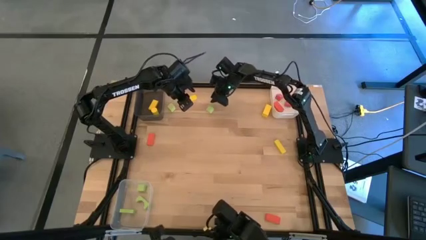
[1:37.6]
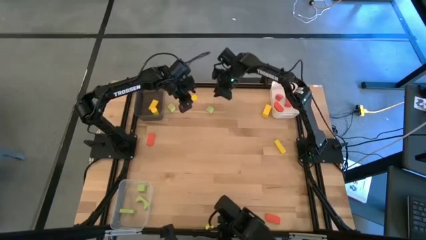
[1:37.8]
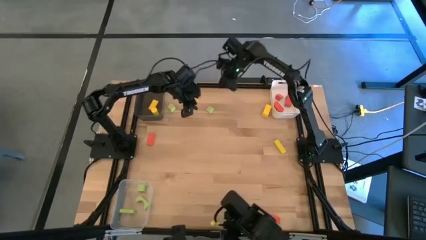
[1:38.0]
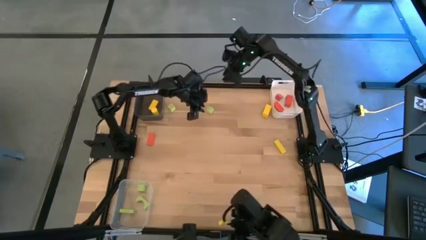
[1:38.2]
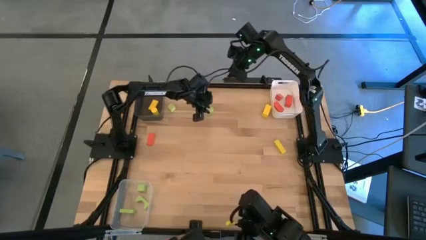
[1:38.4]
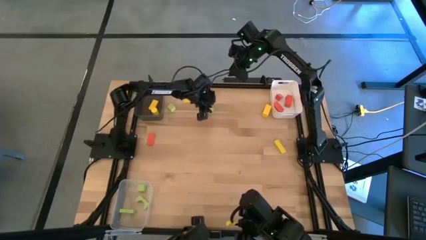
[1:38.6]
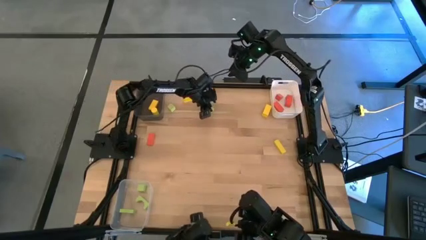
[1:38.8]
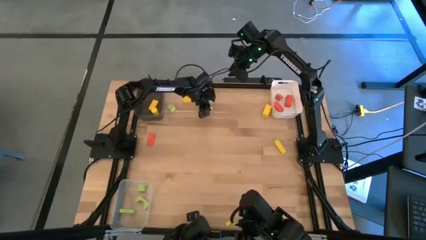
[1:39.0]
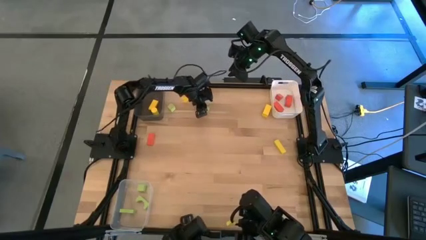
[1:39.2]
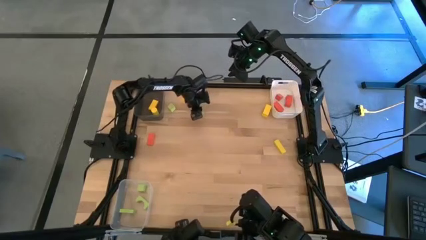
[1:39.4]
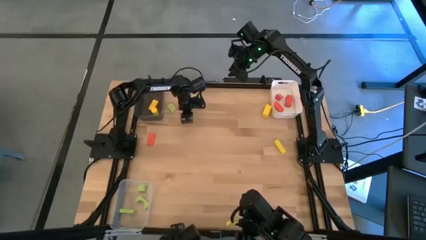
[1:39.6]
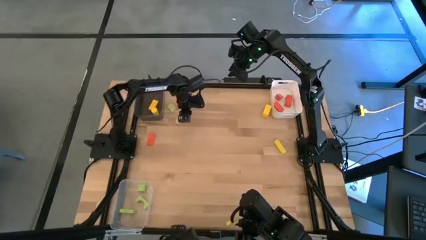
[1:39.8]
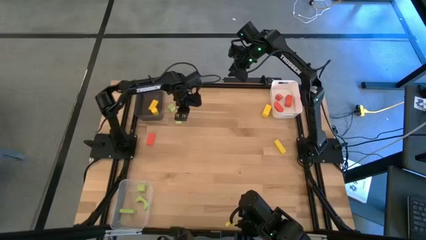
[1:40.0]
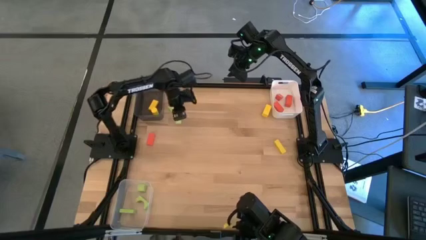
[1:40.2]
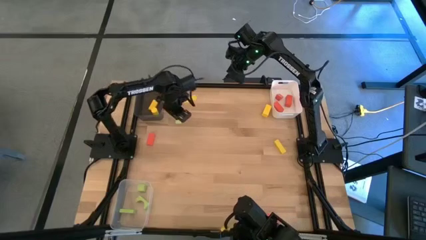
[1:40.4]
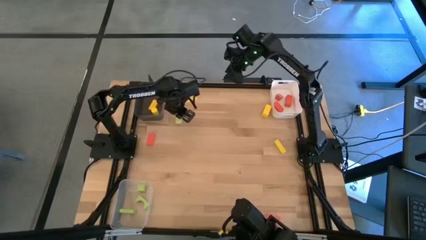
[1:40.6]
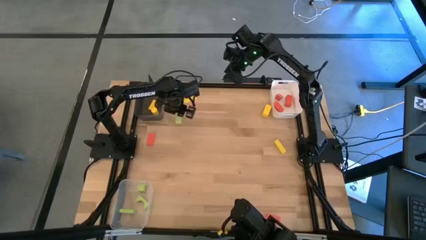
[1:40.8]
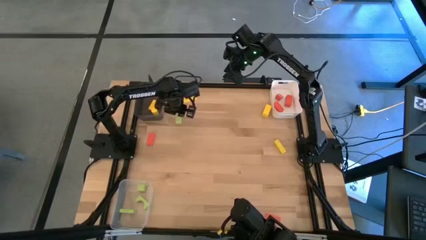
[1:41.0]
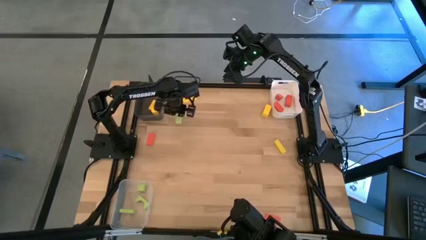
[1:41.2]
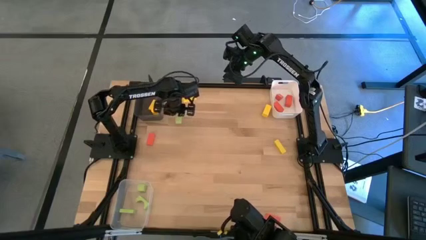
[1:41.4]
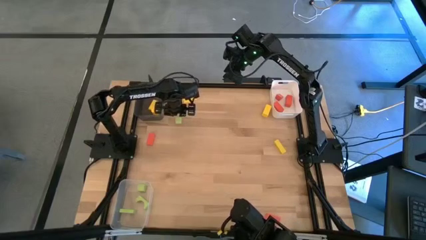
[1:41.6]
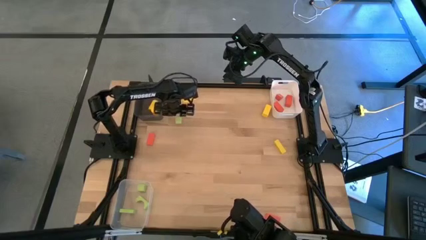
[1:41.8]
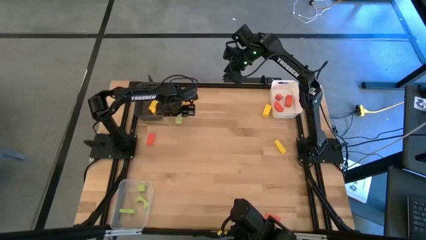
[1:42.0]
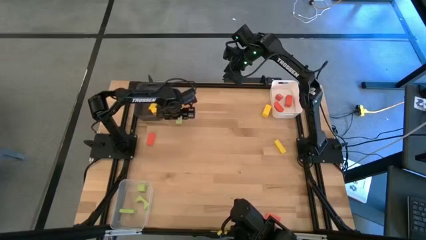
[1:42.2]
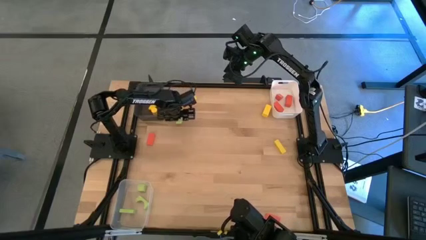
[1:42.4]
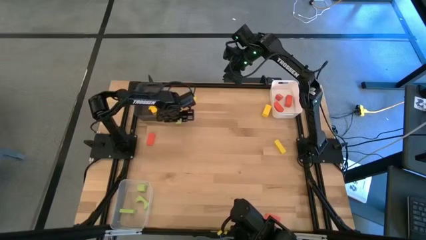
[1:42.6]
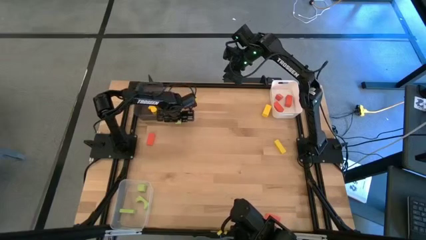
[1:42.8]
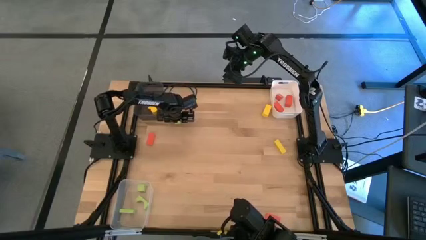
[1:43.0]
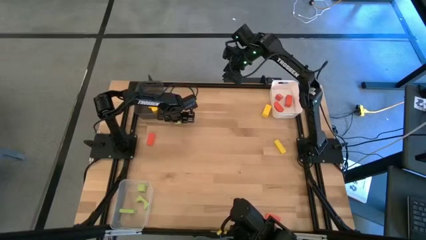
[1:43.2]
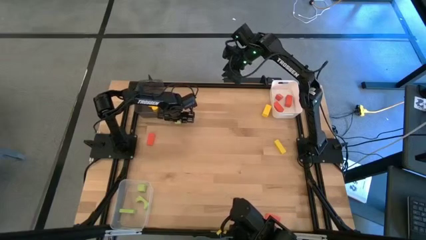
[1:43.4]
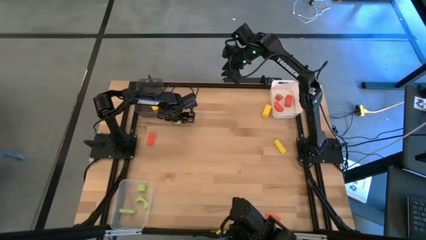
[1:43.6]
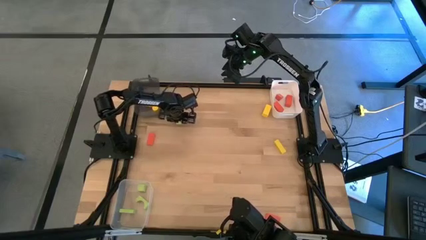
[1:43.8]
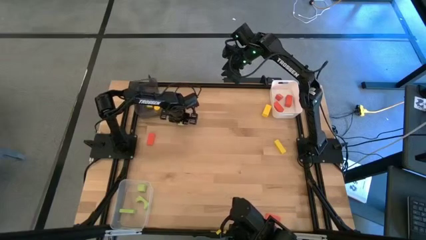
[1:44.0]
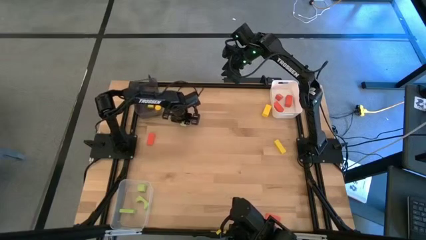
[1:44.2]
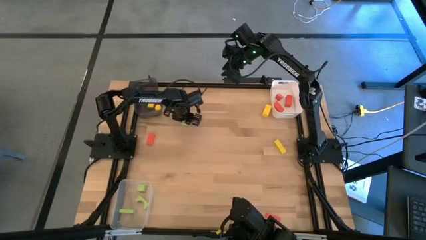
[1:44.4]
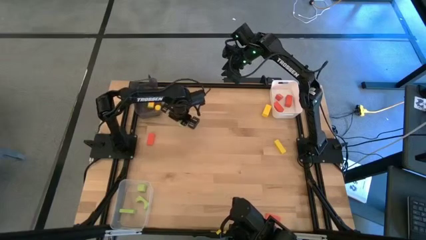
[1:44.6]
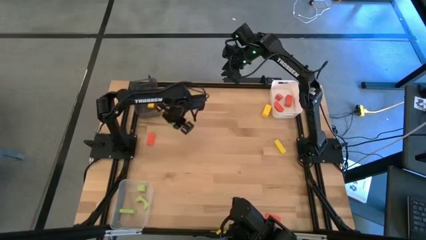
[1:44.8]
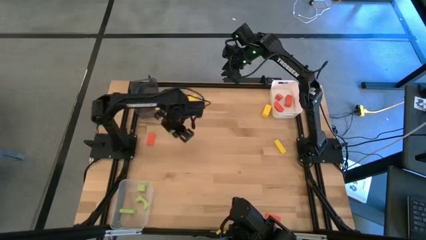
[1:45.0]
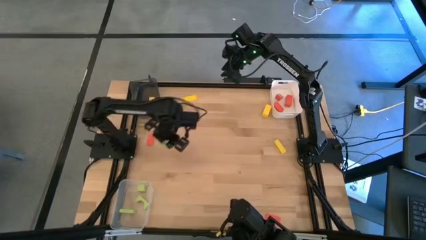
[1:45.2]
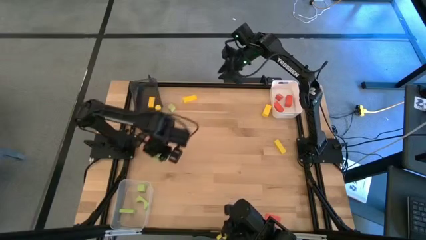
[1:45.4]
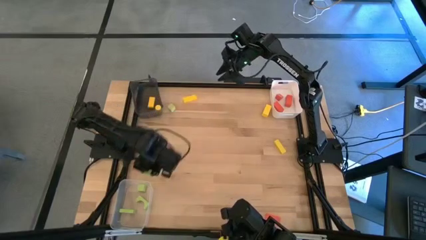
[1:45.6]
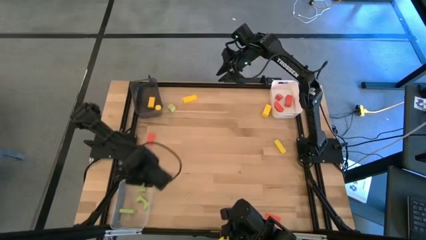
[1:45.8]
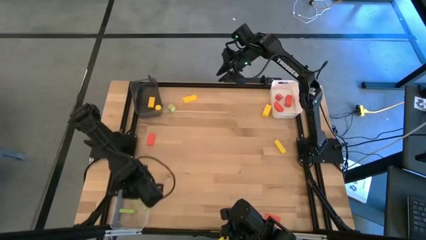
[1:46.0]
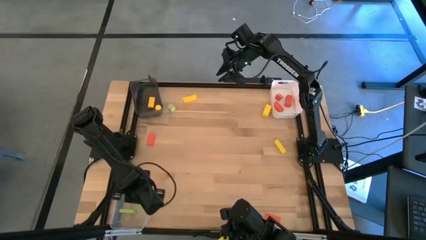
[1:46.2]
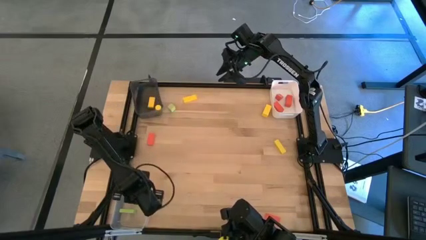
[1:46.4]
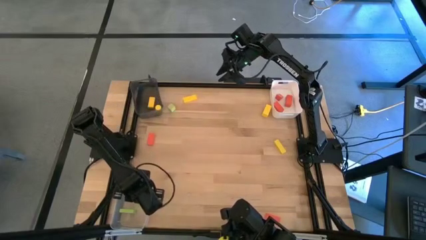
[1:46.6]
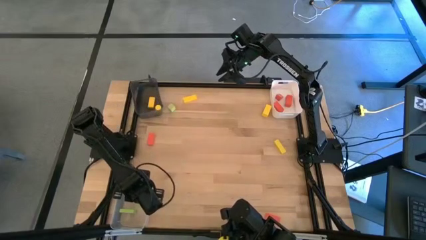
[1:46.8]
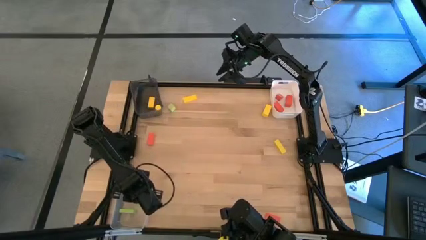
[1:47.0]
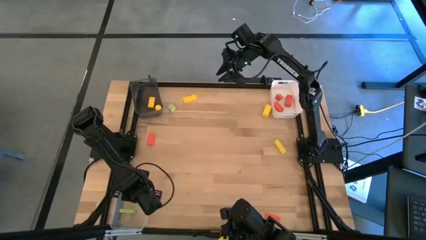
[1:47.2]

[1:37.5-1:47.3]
Task: Sort & place blocks by color
Put the green block into the transparent bin

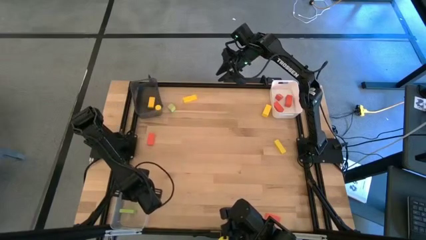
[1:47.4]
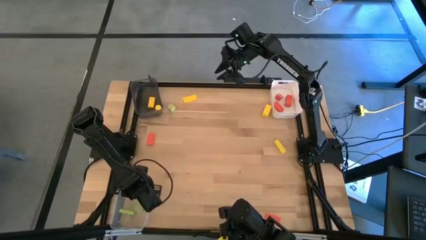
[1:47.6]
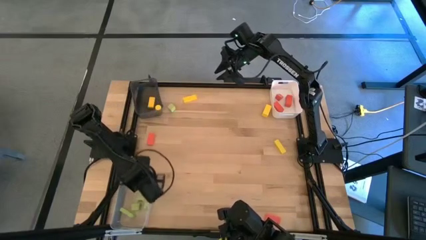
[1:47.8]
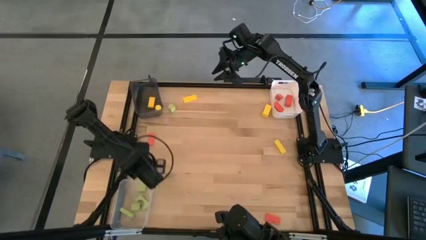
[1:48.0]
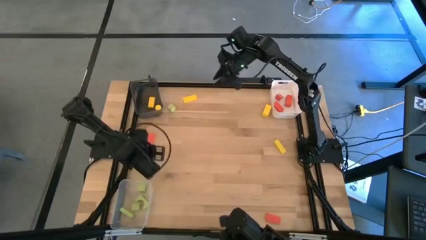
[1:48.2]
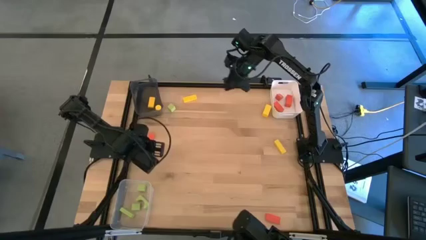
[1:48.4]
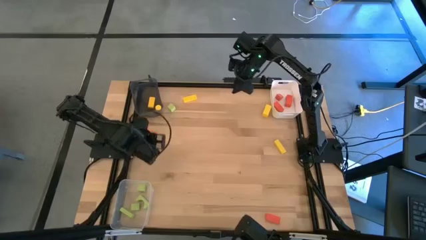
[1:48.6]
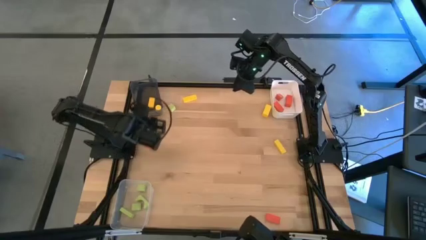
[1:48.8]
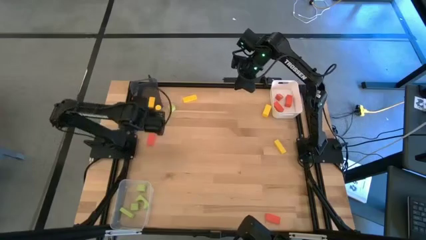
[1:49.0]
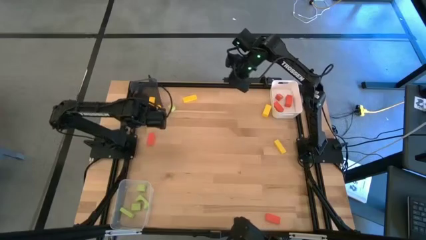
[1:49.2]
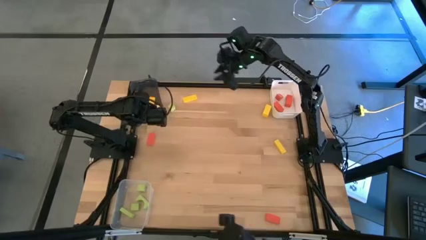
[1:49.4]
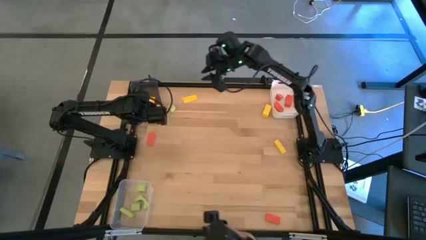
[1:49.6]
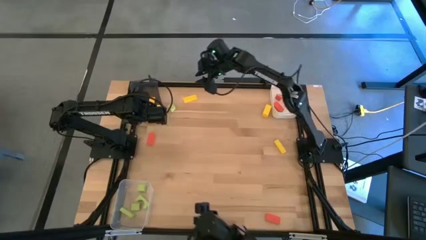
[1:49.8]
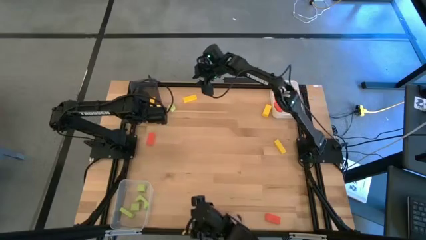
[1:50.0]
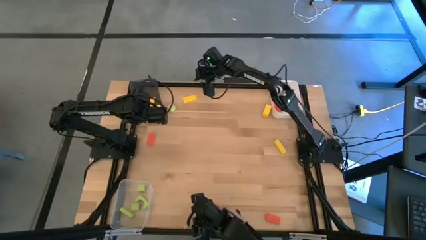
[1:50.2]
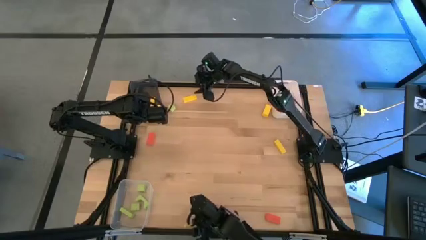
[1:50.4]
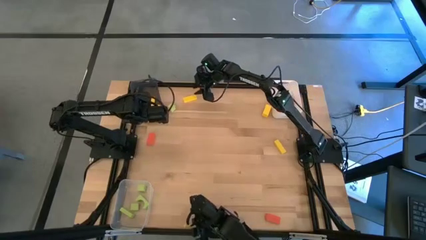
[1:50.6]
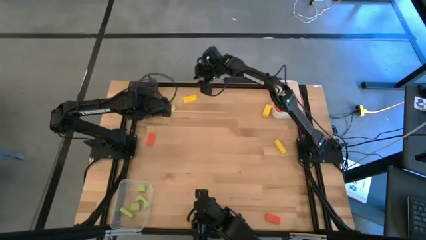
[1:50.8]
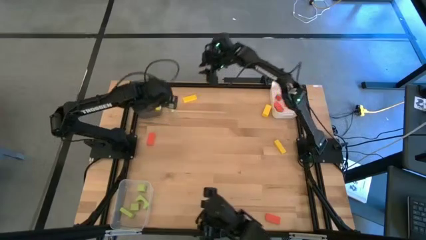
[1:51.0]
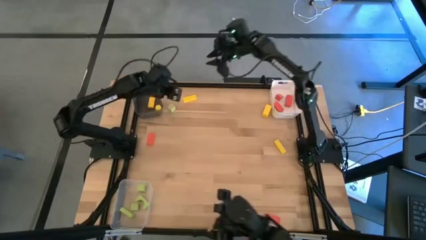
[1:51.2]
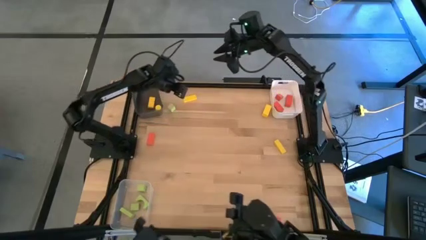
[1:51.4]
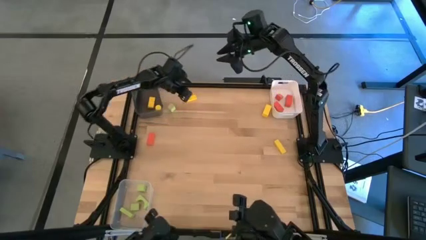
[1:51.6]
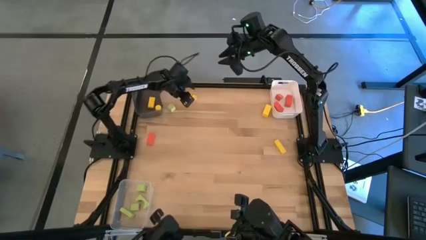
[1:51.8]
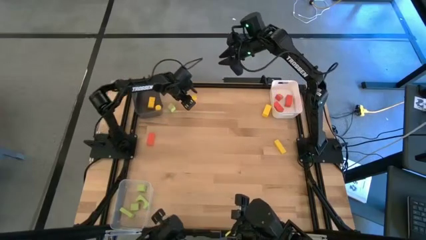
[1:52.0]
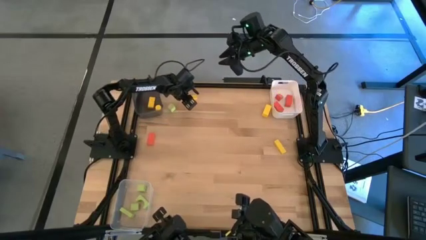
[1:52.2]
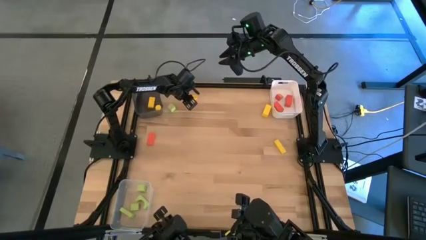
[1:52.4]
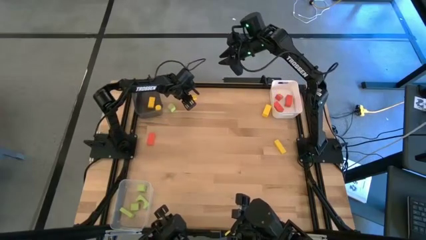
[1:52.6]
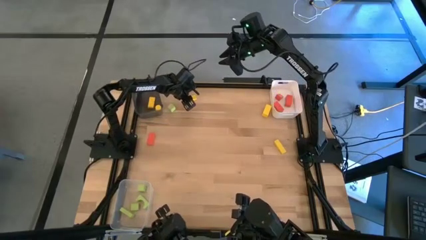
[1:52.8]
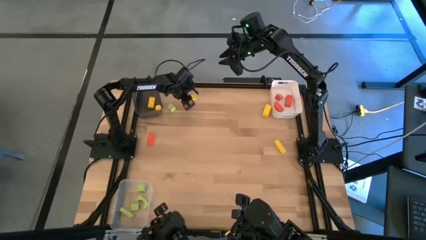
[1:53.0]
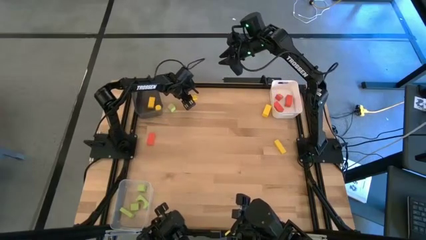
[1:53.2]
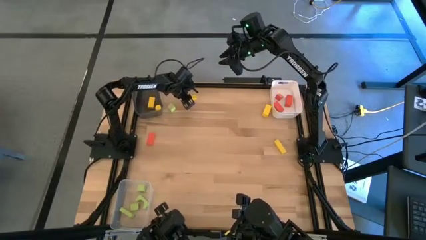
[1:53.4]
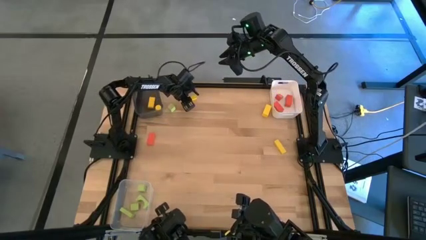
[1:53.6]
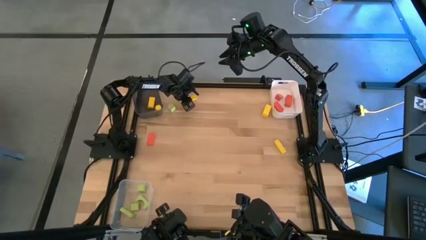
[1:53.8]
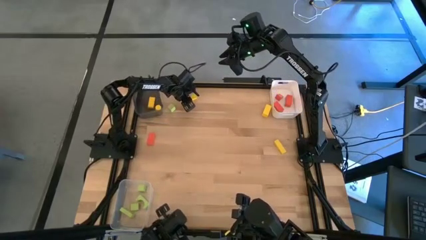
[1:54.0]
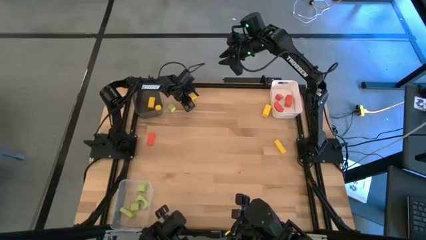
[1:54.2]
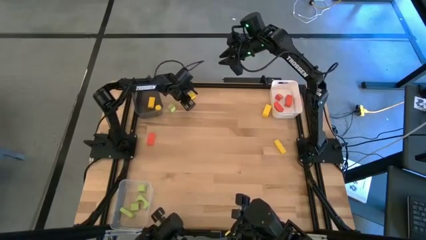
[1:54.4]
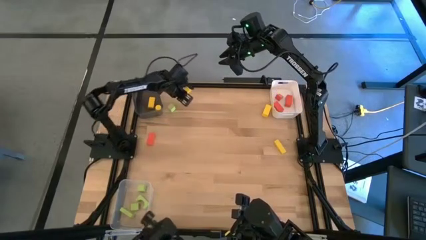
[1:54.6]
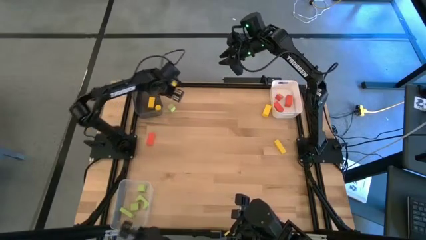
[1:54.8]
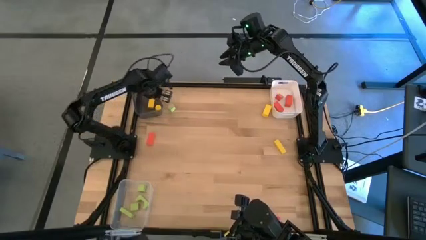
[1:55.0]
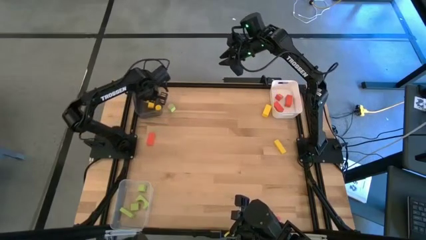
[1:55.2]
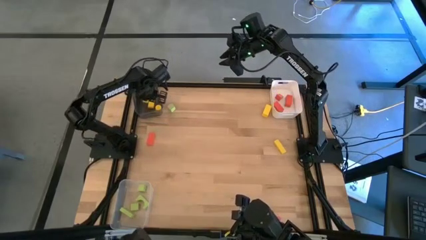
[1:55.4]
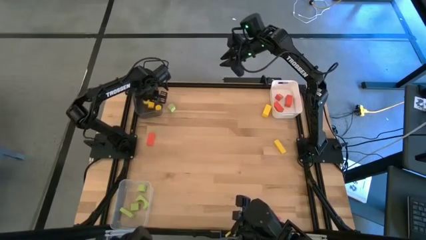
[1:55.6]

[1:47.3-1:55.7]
Put the yellow block into the black bin
